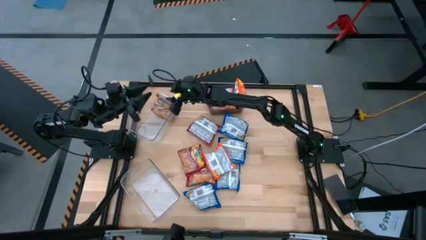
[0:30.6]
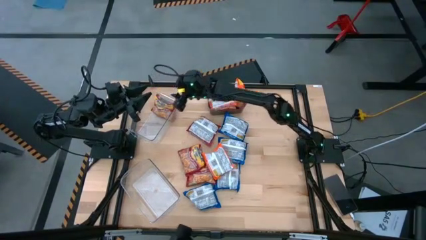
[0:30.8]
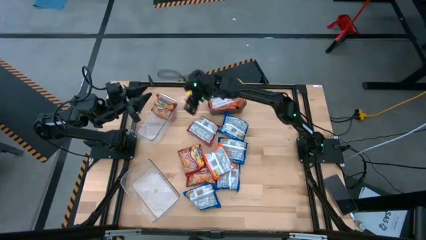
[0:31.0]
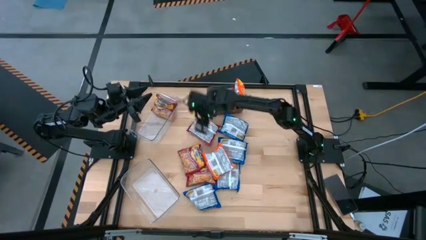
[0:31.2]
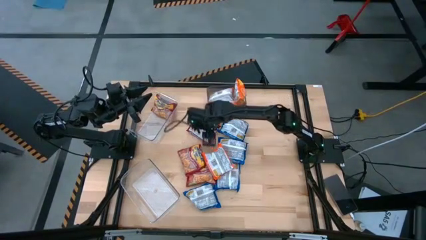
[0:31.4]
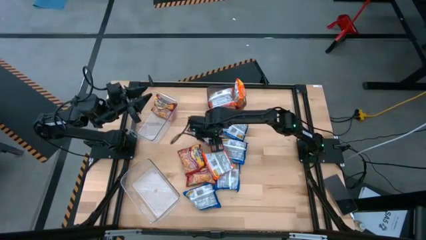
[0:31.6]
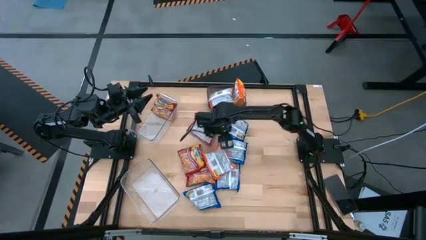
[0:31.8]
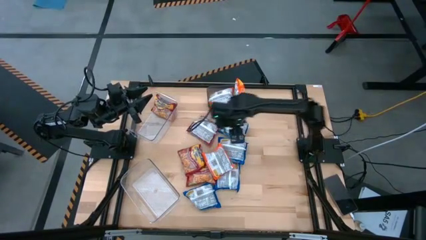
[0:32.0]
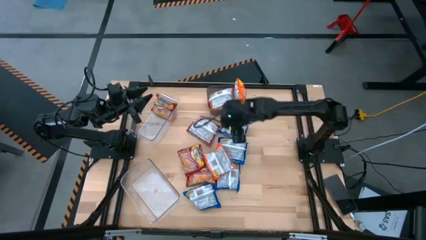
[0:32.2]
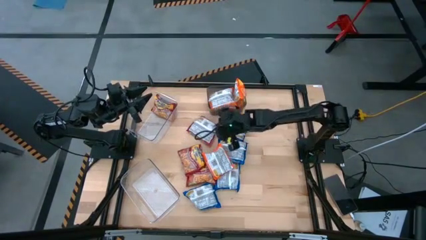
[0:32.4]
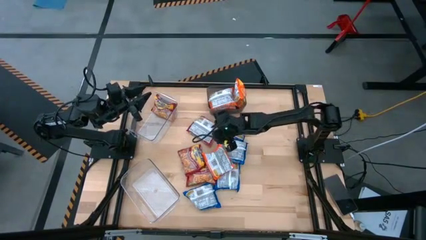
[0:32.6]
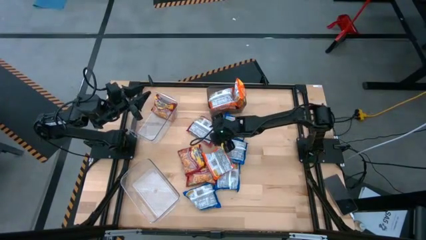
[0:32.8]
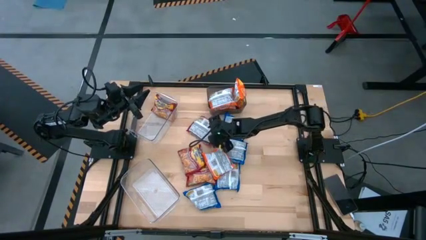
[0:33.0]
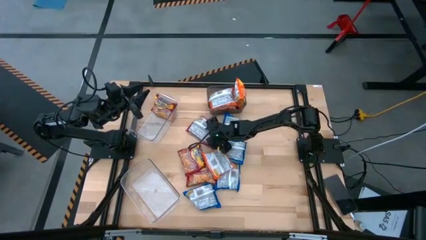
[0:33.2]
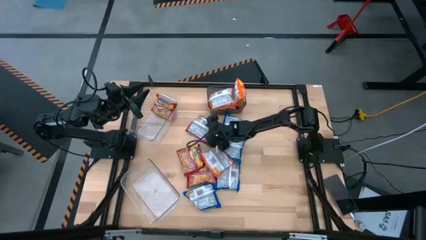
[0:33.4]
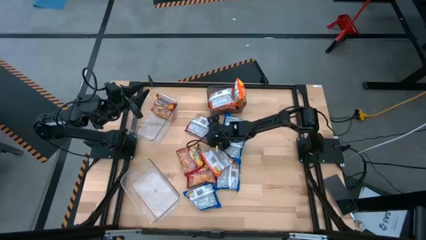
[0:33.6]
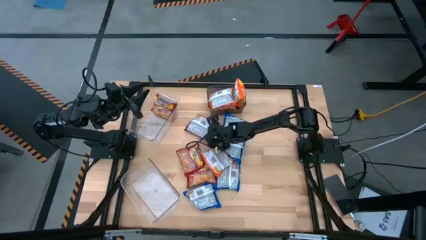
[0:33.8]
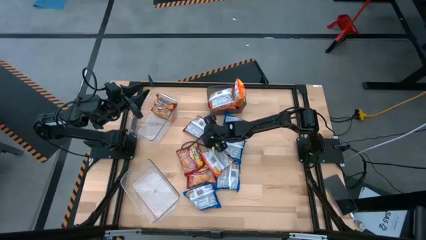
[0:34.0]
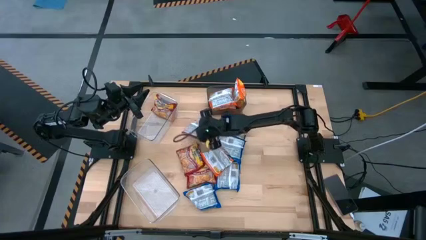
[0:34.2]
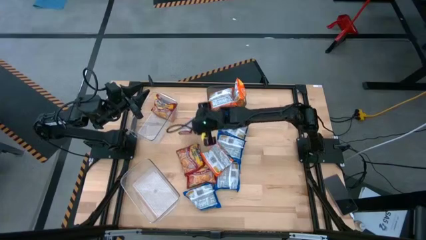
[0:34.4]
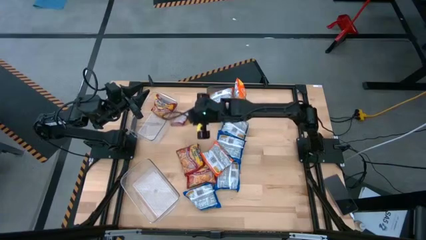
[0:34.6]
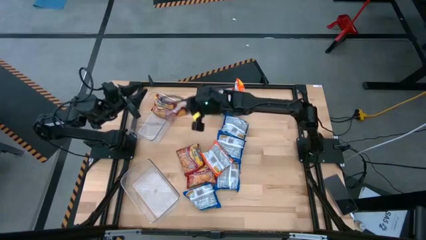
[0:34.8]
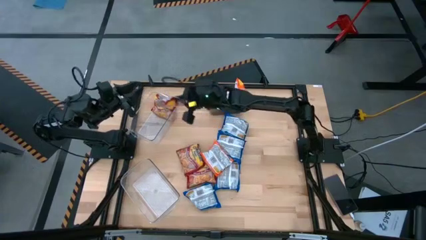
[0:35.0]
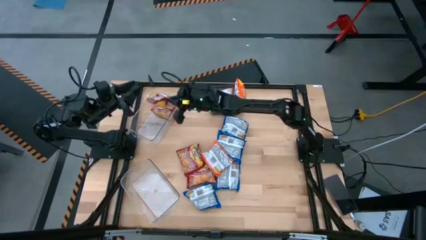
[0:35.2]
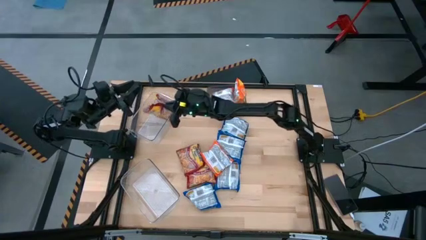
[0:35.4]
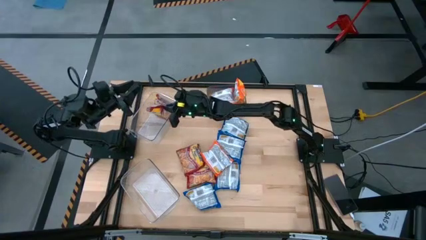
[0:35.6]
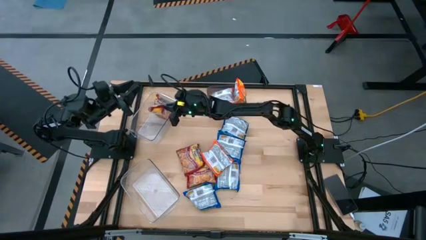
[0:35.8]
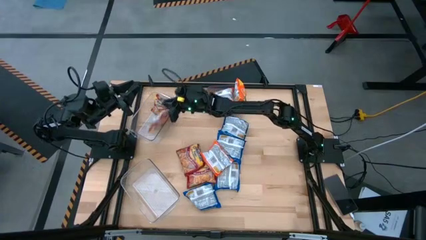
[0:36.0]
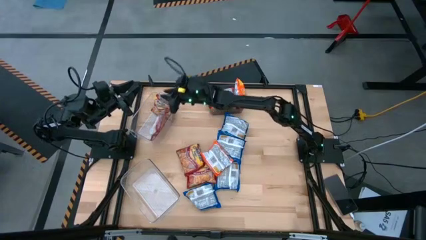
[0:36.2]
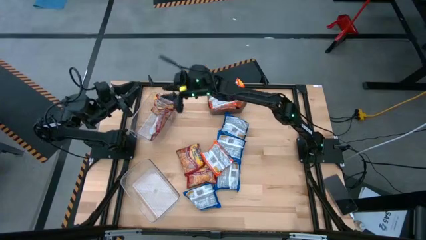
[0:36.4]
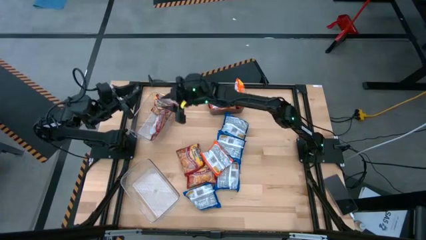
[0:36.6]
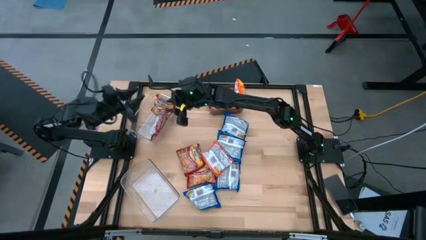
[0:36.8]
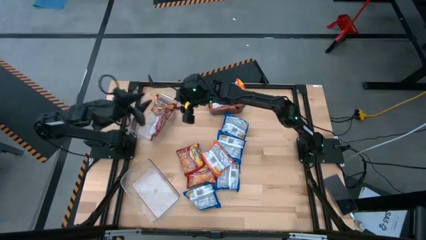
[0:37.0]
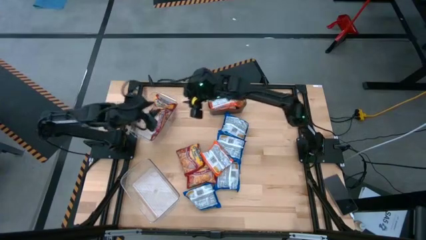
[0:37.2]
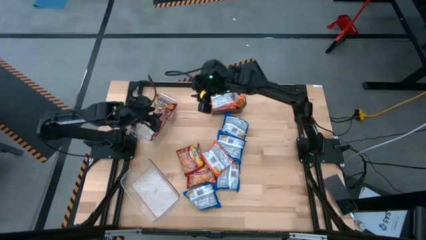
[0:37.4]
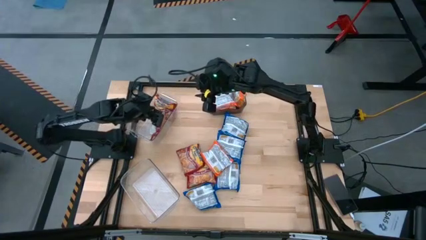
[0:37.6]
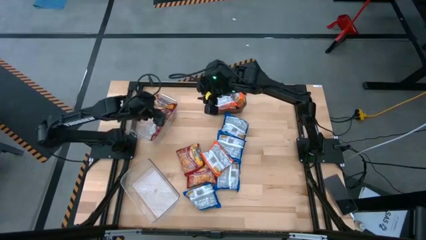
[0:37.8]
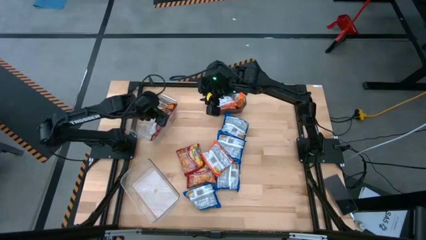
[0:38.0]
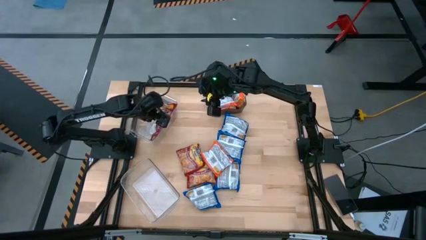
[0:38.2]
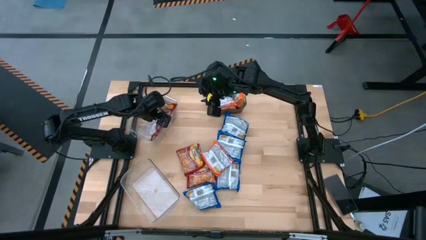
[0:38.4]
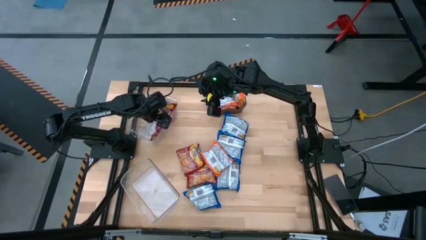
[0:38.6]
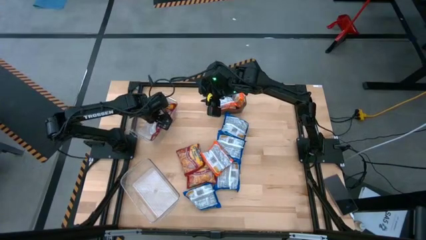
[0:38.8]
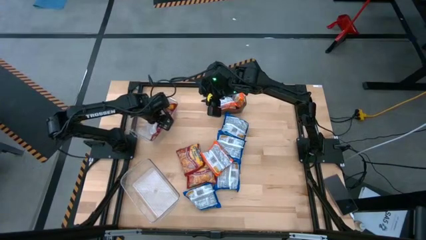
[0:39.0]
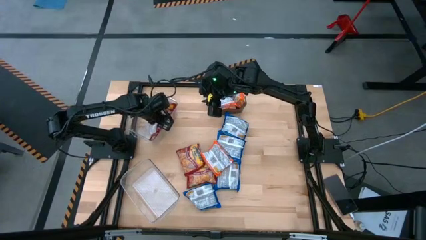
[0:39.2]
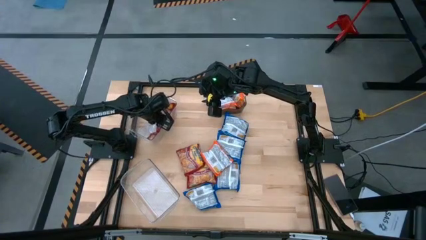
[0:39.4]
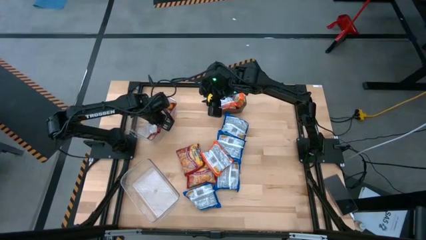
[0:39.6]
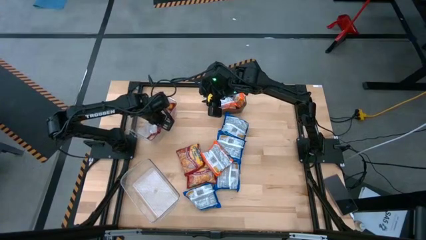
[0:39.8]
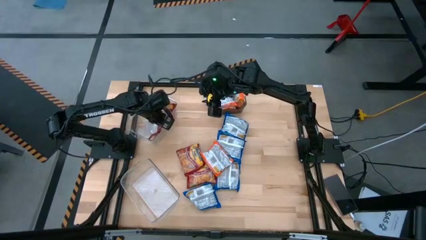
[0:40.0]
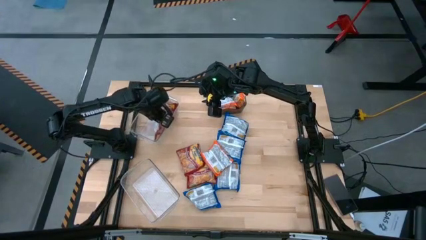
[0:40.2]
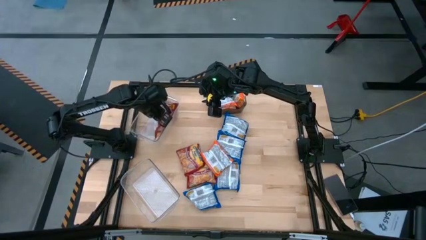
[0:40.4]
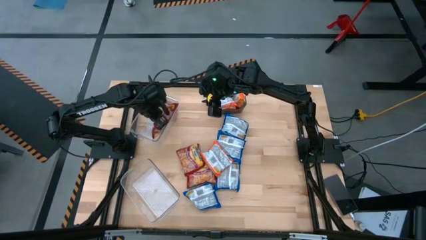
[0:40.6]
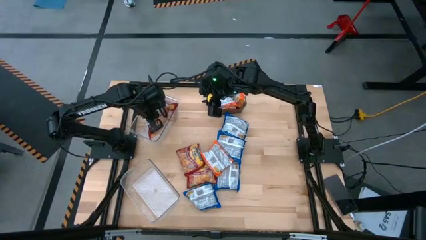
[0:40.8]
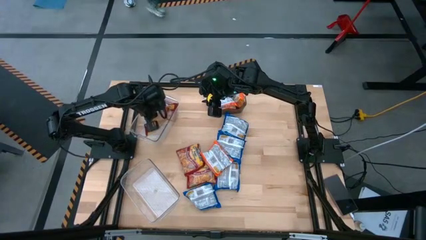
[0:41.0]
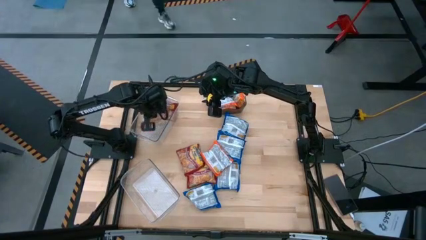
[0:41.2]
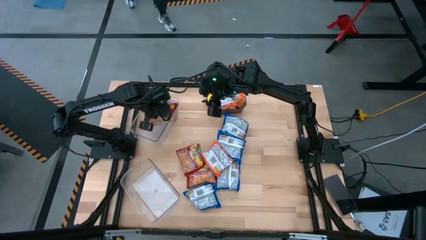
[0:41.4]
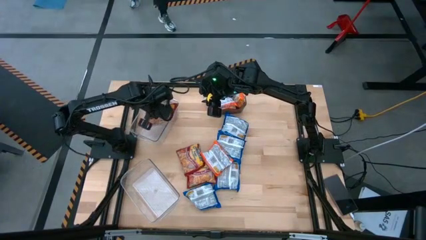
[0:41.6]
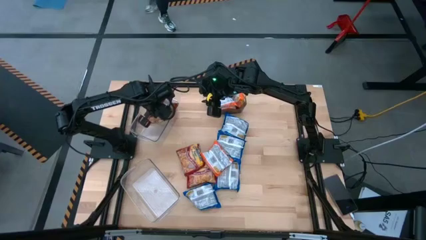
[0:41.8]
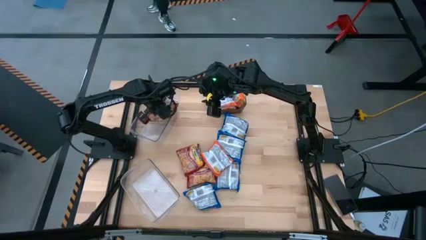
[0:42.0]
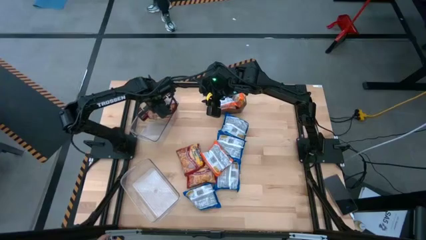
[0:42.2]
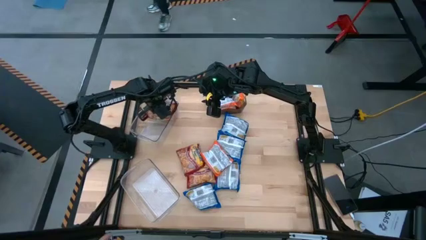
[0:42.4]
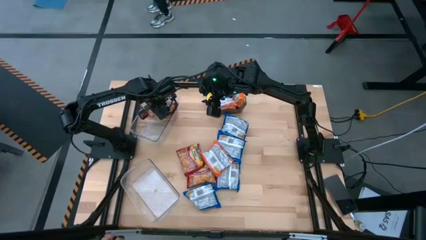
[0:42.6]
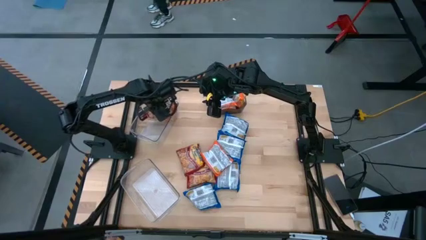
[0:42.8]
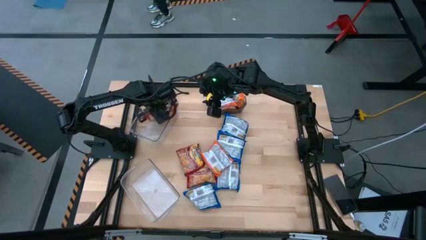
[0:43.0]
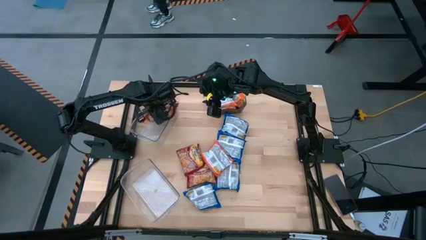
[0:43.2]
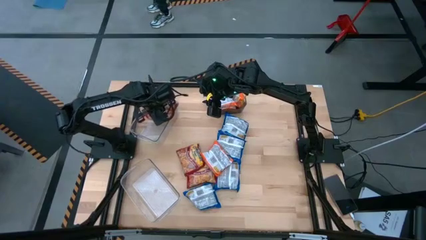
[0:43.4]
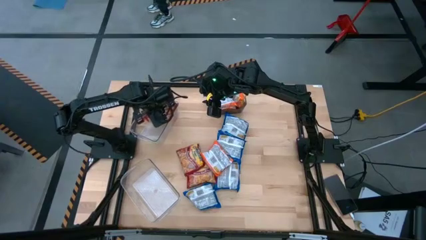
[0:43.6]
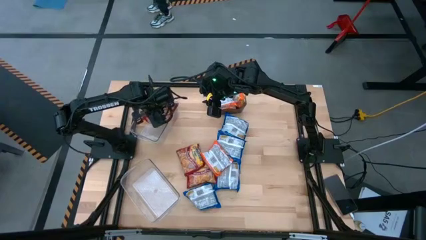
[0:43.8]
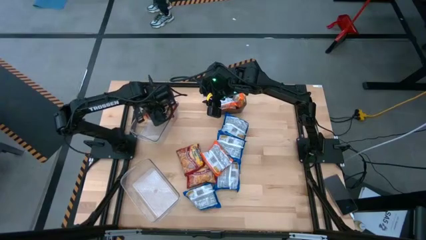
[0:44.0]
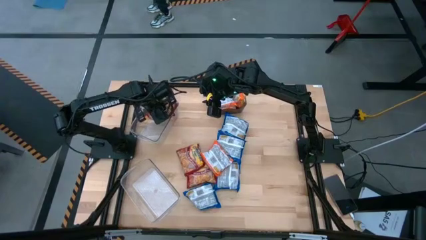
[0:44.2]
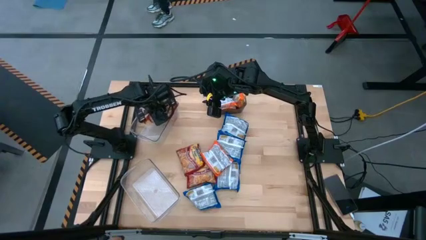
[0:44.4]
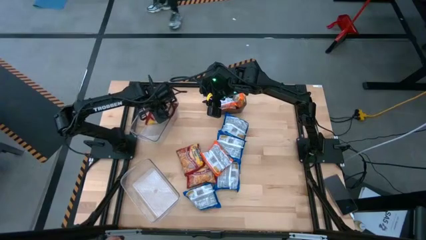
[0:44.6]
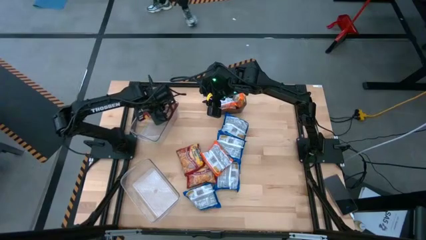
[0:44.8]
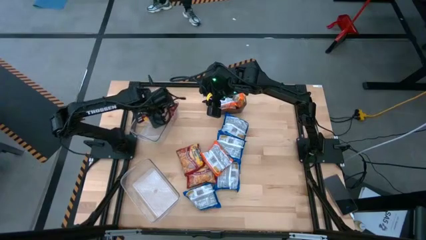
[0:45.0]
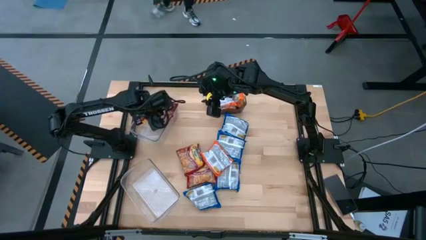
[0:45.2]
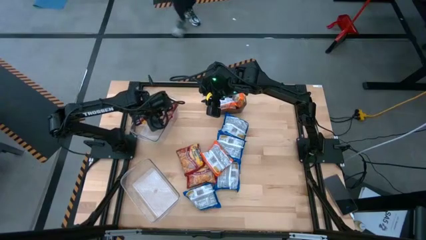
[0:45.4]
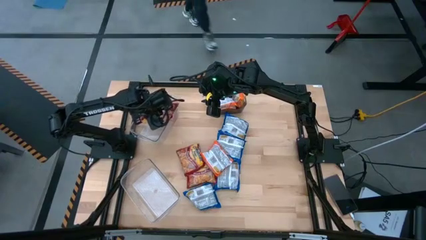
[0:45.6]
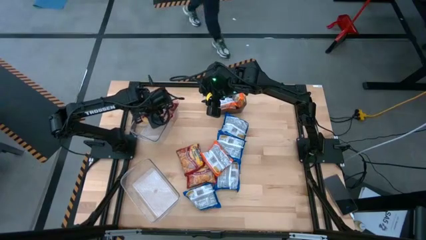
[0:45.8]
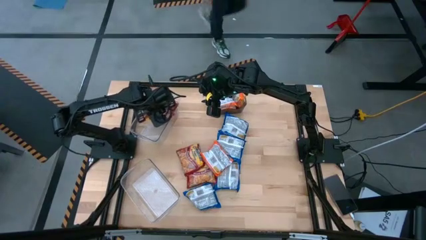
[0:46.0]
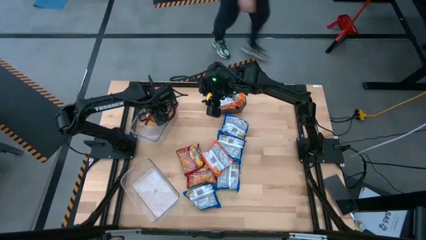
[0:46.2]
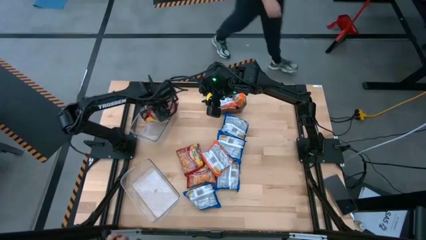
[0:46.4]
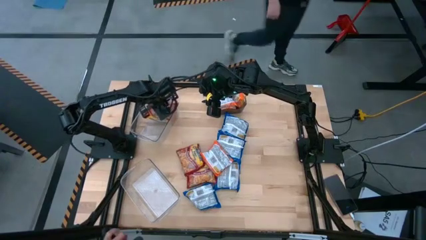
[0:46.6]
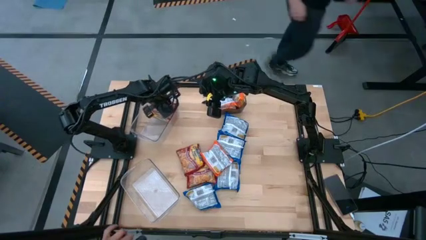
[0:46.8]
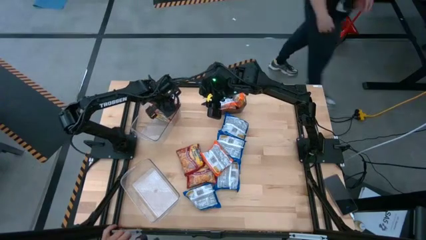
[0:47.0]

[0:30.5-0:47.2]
Task: Sort Maruchan noodles
Put the top red noodle pack into the top transparent bin
